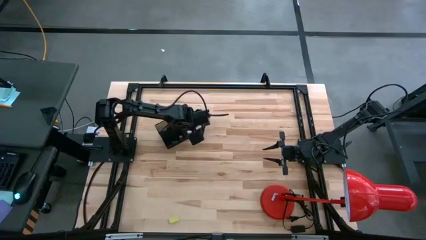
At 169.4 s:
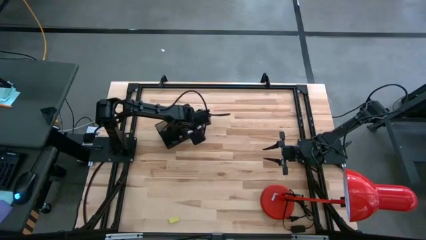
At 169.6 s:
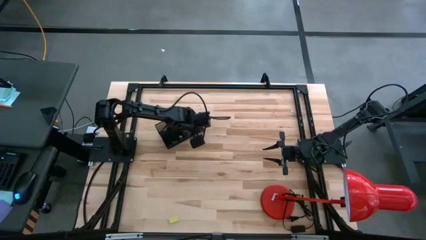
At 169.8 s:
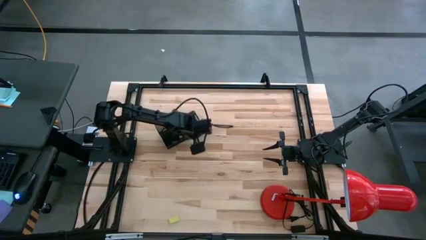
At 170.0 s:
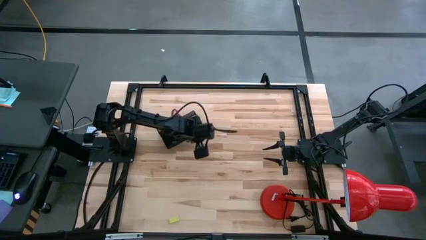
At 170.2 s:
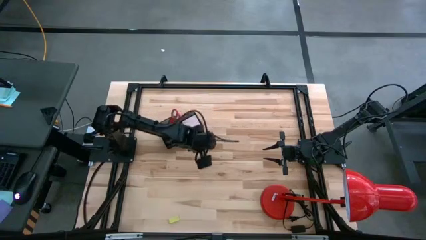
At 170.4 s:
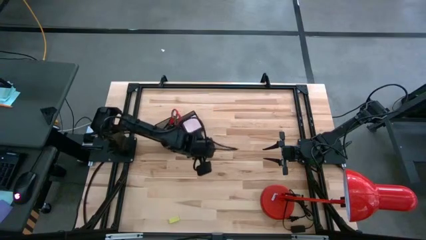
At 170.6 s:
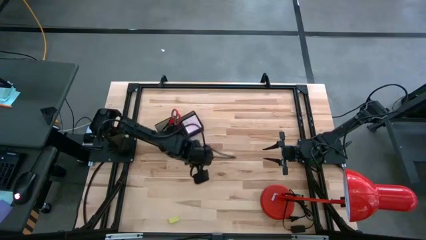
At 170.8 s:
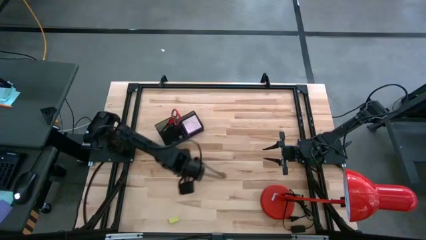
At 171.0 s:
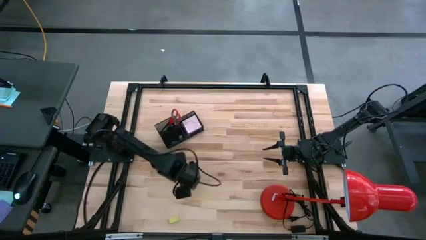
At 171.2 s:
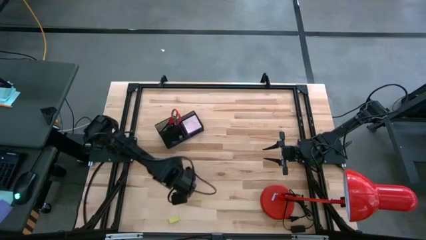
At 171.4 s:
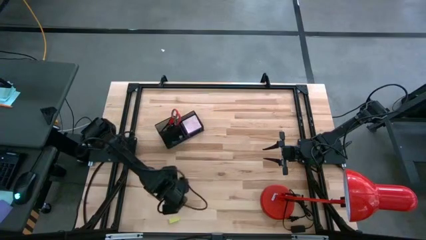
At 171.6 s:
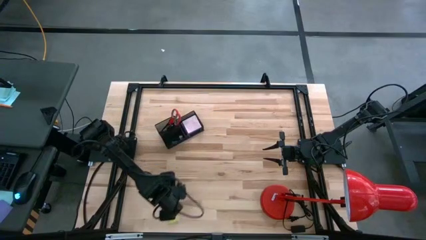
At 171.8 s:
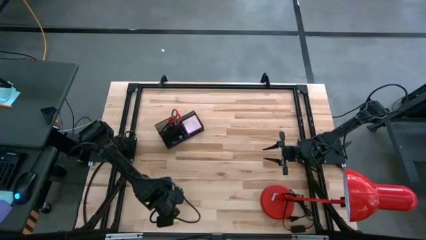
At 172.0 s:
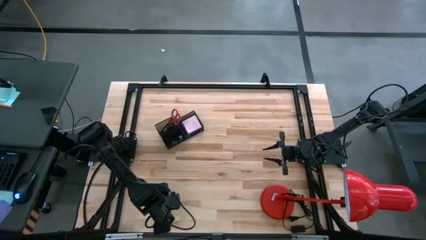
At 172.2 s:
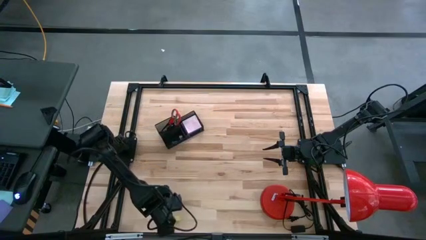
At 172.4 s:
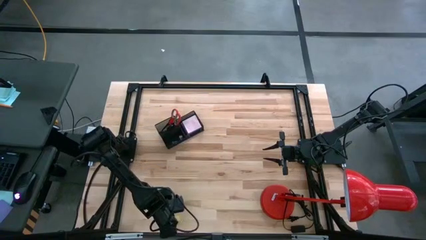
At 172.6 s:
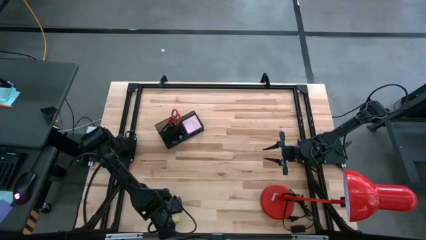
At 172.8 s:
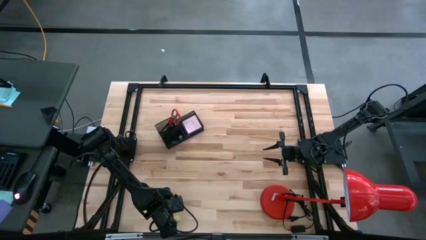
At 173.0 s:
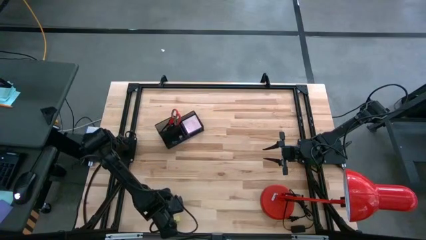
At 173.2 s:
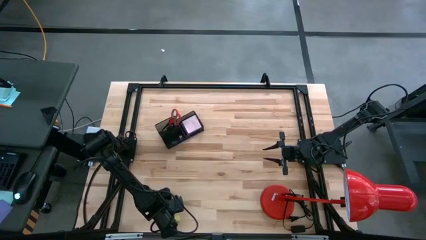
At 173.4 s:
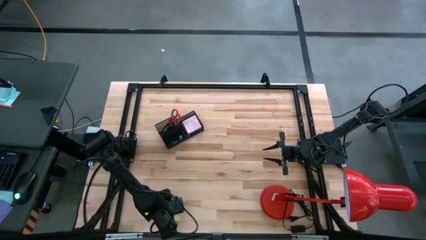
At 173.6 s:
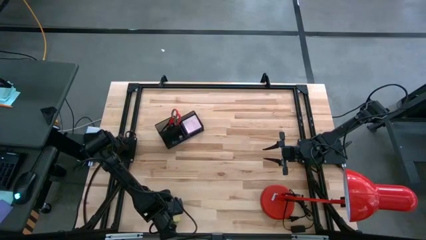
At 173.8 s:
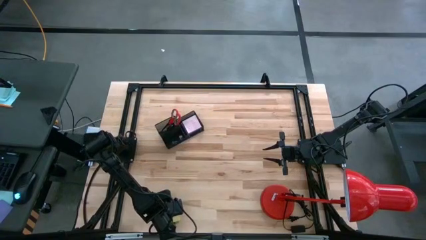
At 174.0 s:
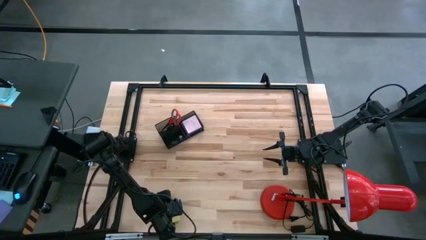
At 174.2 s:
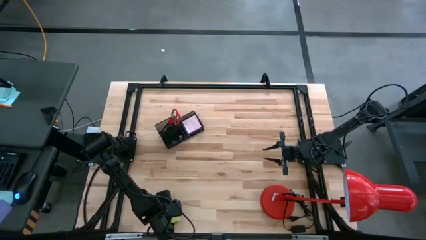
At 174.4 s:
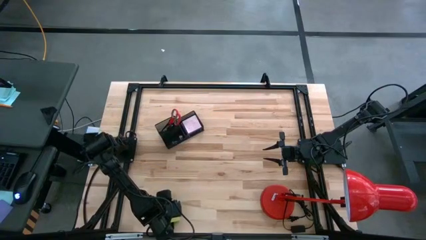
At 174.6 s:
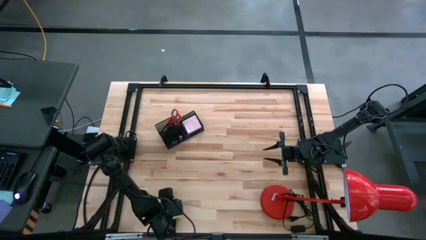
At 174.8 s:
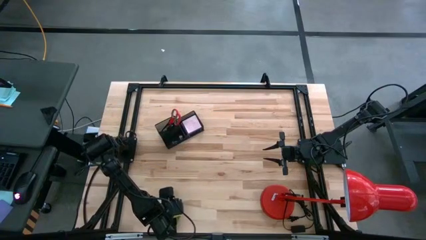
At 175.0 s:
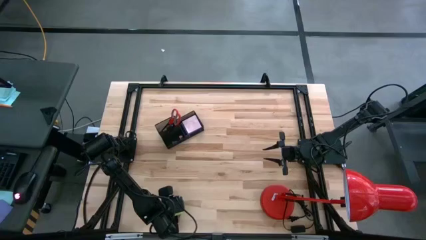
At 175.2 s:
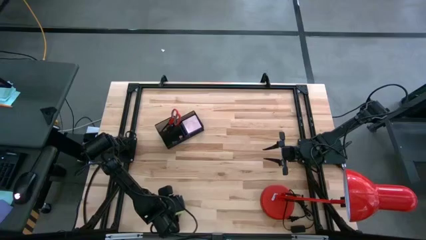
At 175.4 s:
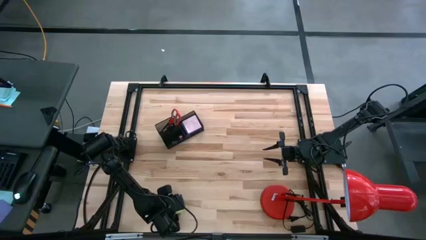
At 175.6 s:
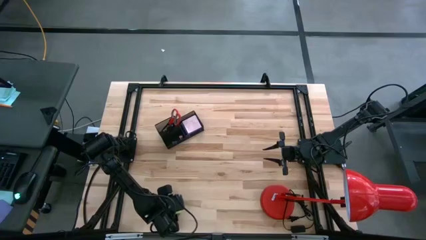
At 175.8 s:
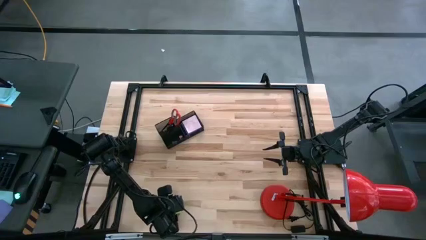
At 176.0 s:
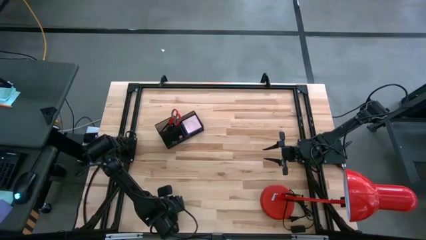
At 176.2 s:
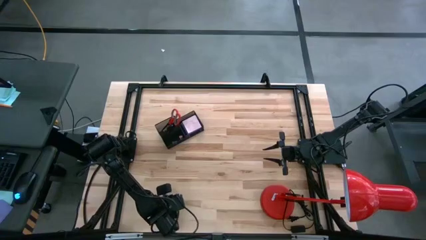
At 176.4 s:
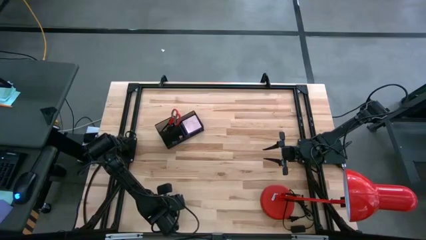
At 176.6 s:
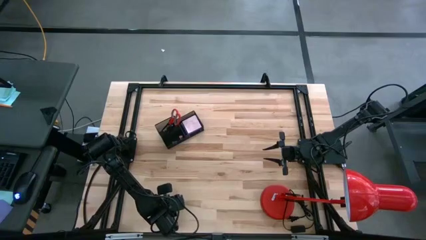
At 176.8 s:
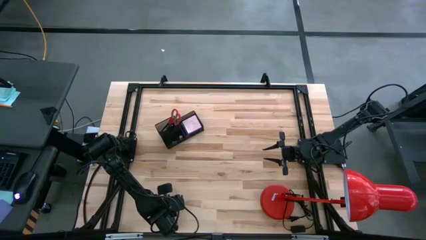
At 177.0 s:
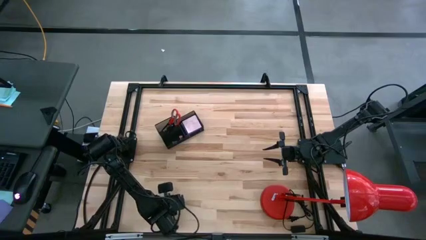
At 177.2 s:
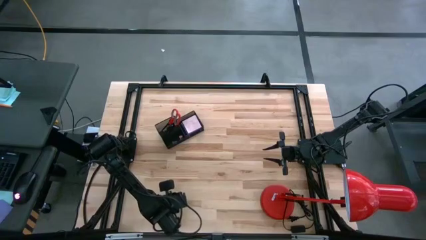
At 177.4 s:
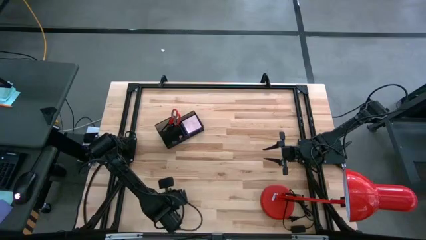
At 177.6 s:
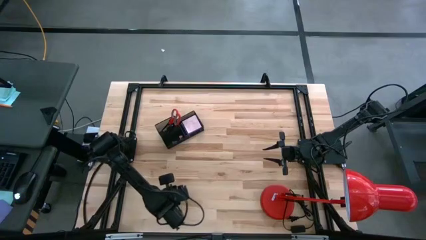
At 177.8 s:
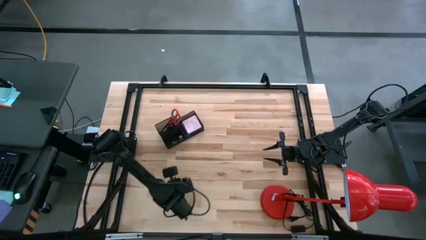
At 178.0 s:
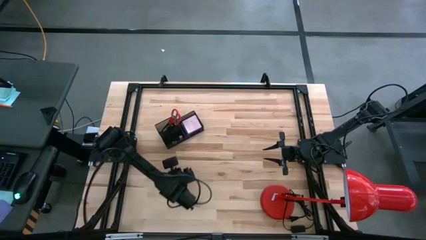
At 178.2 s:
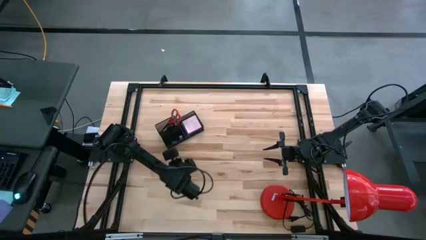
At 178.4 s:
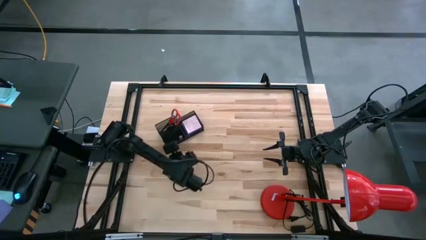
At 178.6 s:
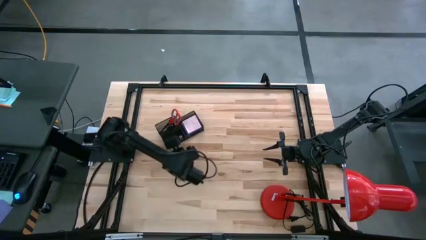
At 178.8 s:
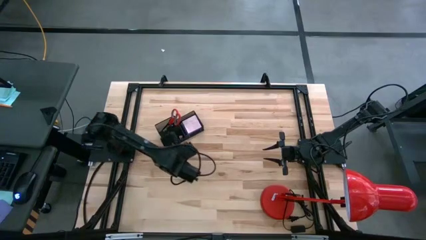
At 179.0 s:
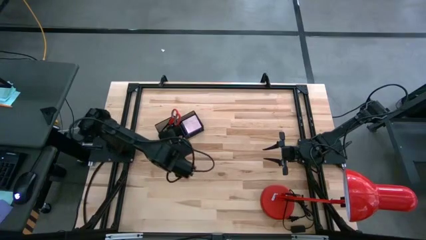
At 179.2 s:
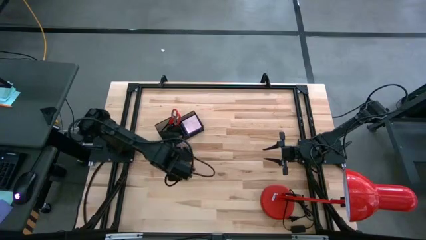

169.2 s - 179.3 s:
Task: Pick and place office supplies into organizer
Put the eraser into the desk organizer
